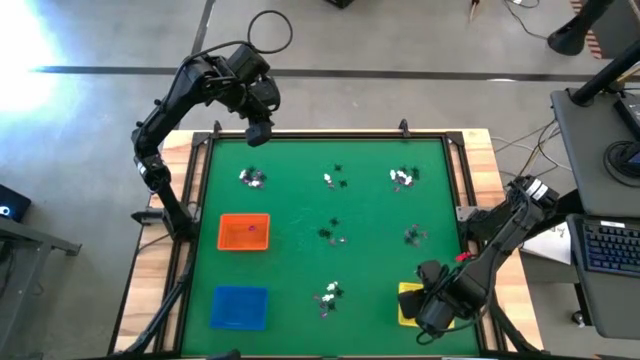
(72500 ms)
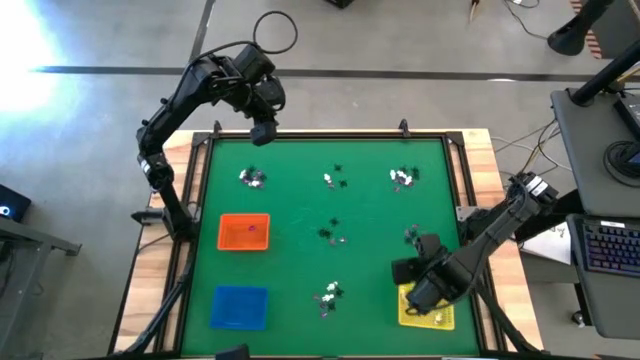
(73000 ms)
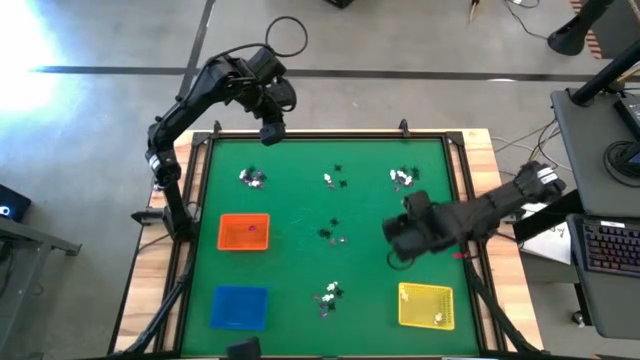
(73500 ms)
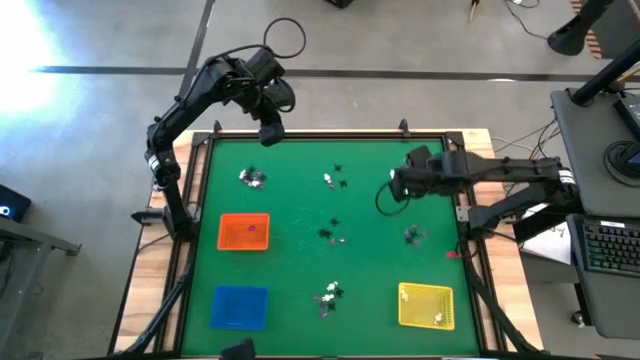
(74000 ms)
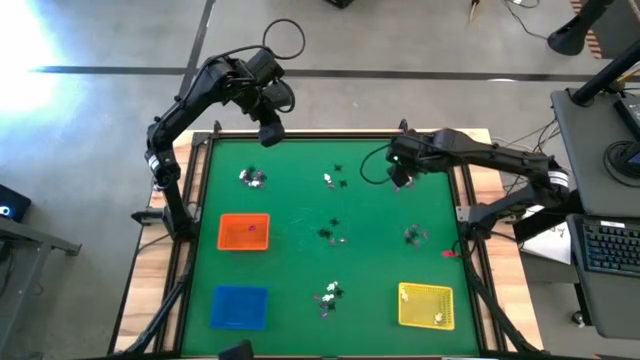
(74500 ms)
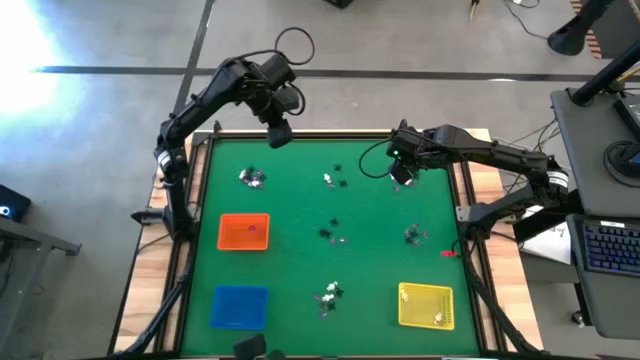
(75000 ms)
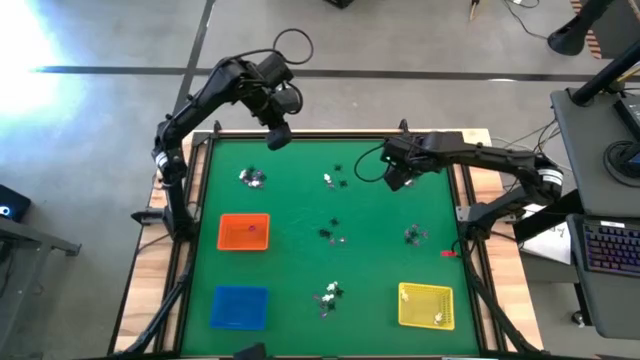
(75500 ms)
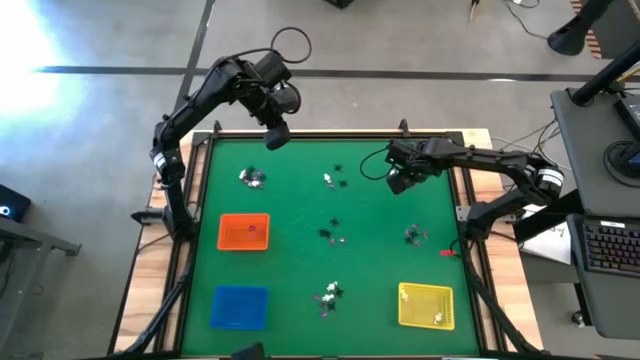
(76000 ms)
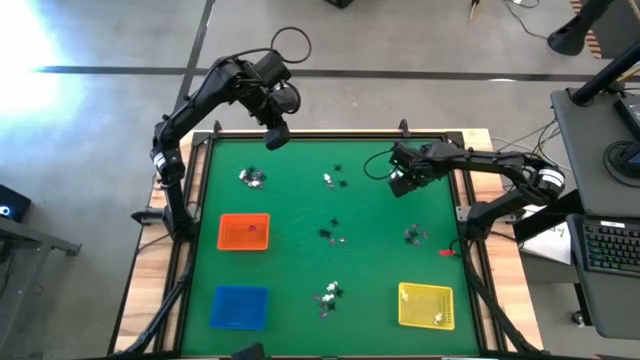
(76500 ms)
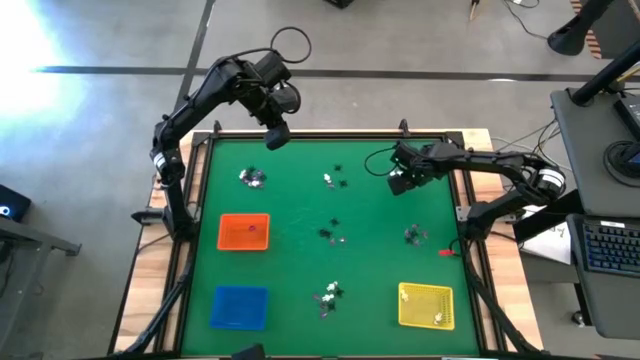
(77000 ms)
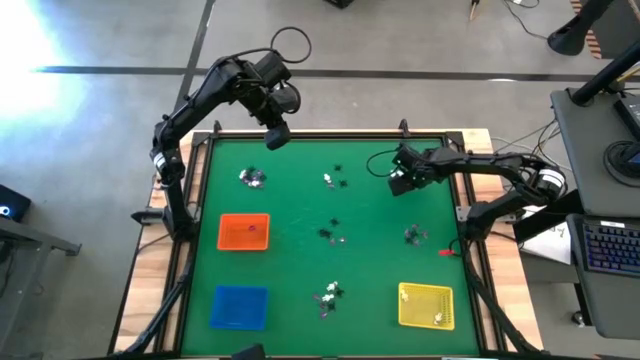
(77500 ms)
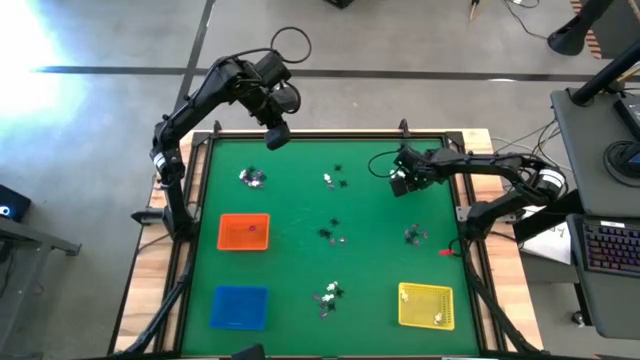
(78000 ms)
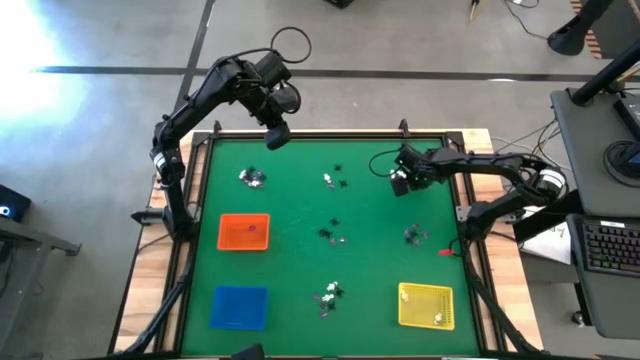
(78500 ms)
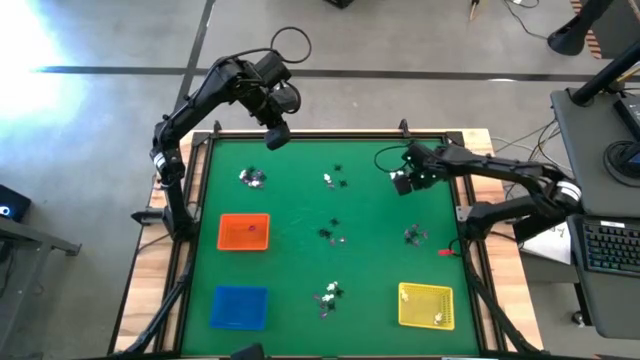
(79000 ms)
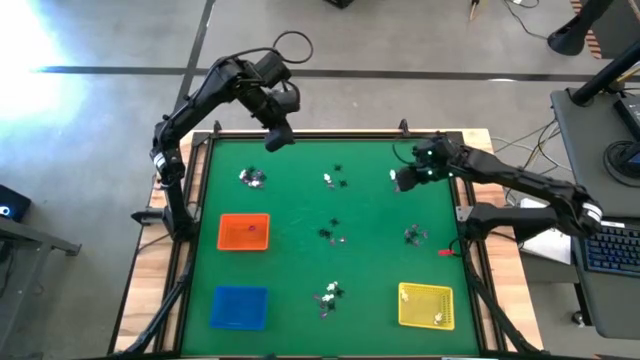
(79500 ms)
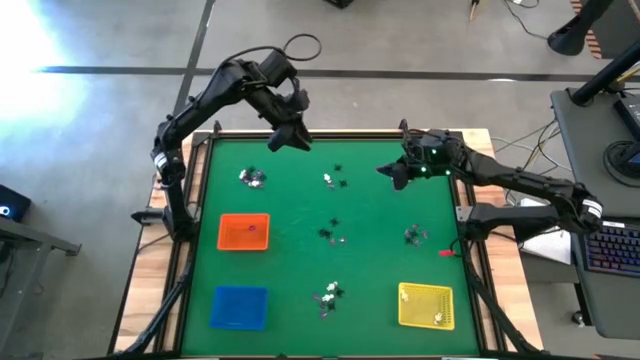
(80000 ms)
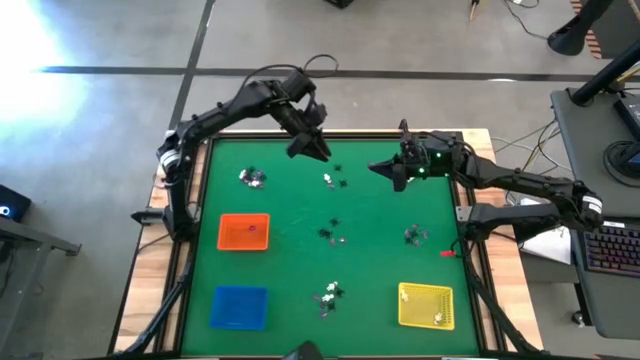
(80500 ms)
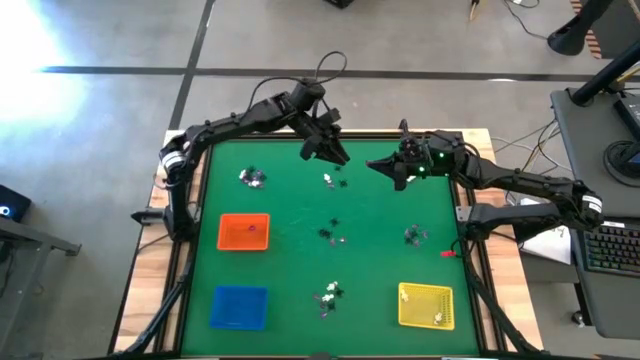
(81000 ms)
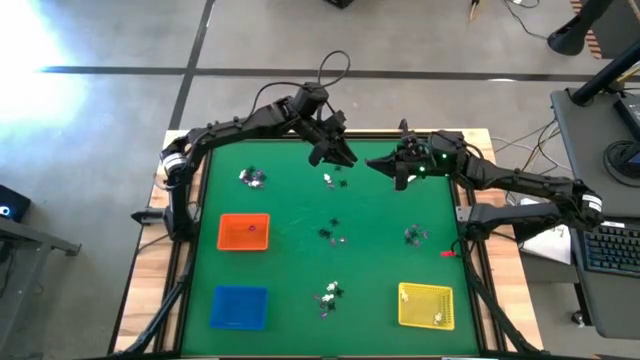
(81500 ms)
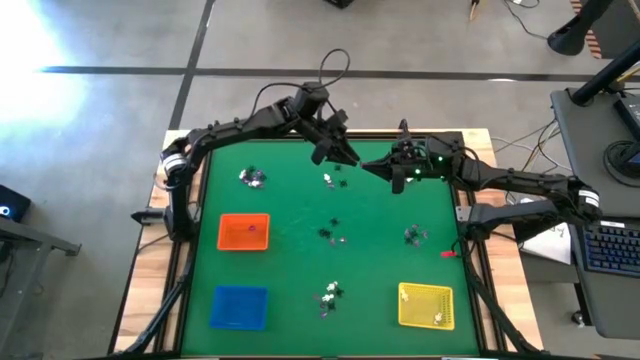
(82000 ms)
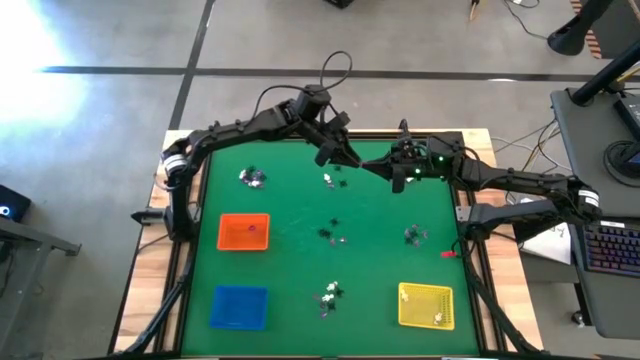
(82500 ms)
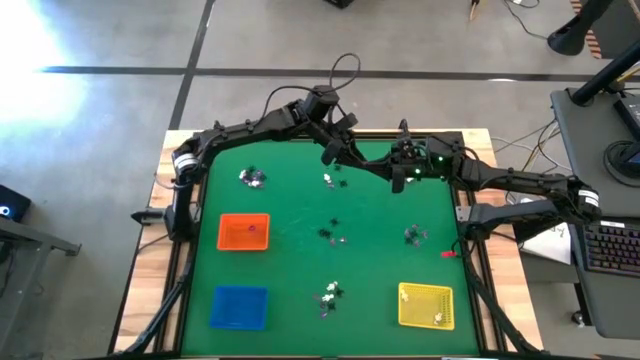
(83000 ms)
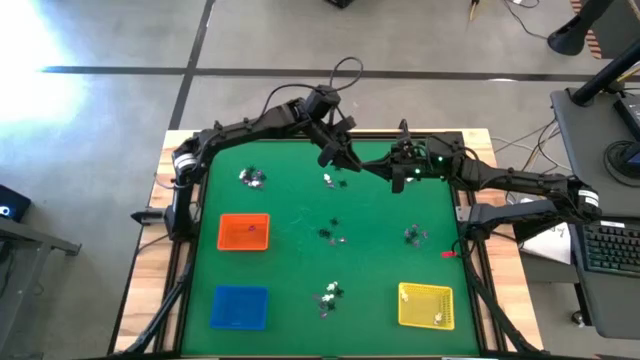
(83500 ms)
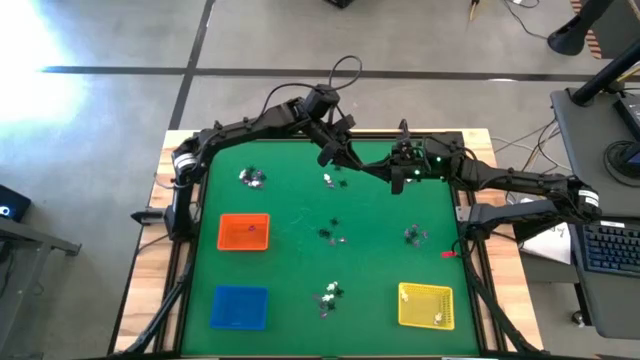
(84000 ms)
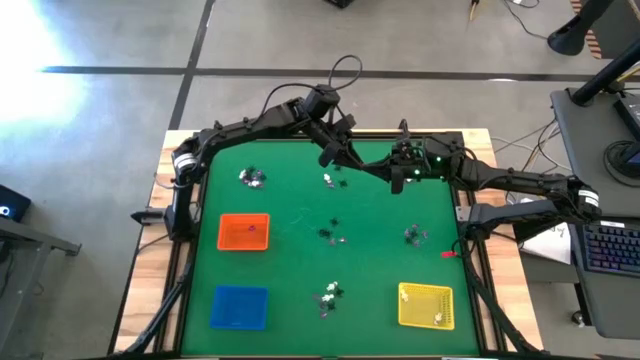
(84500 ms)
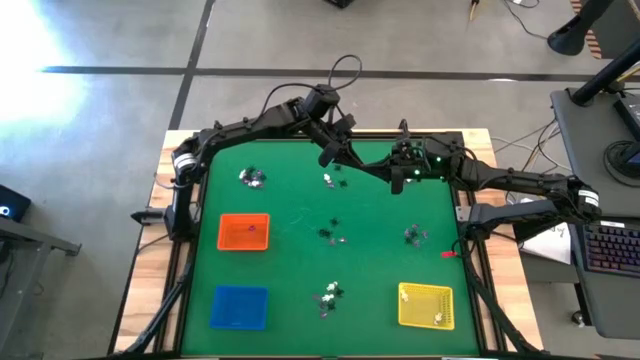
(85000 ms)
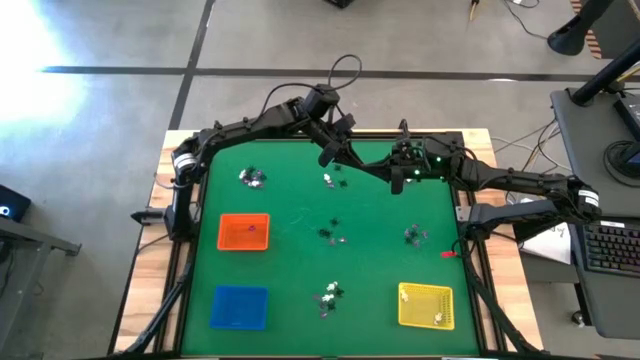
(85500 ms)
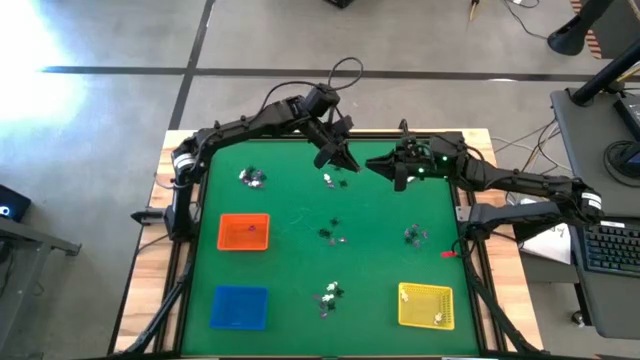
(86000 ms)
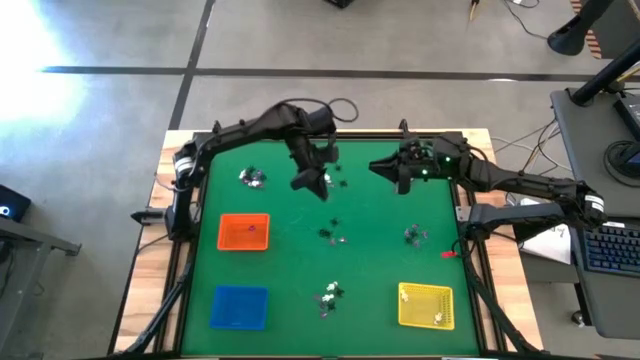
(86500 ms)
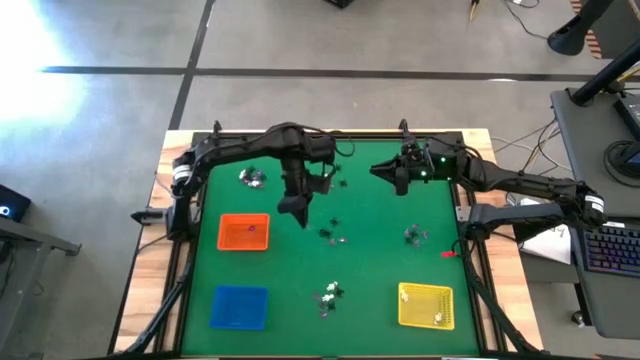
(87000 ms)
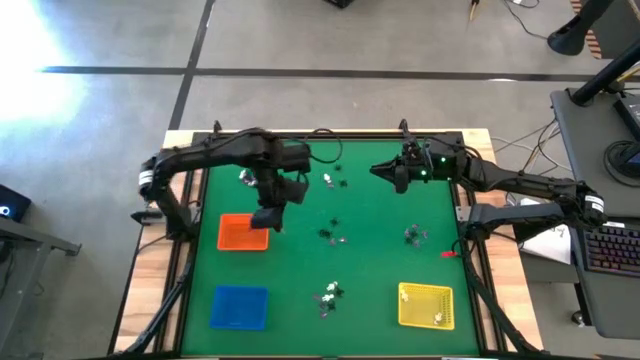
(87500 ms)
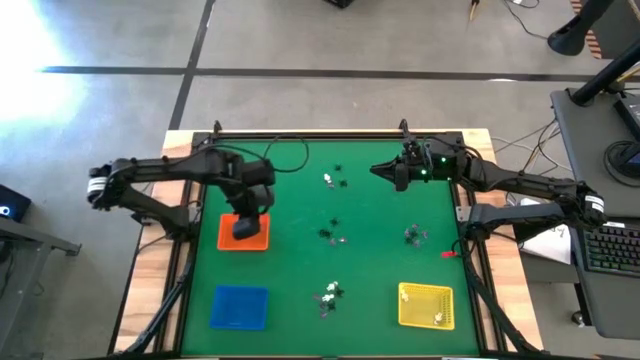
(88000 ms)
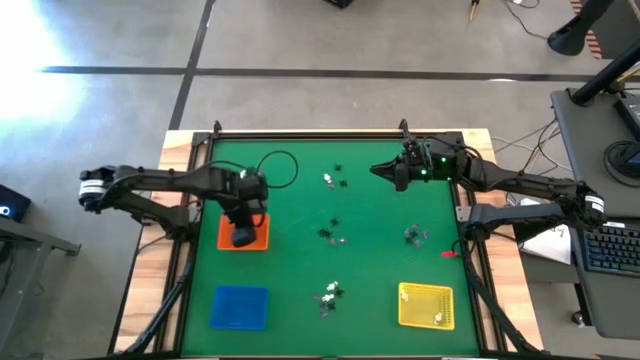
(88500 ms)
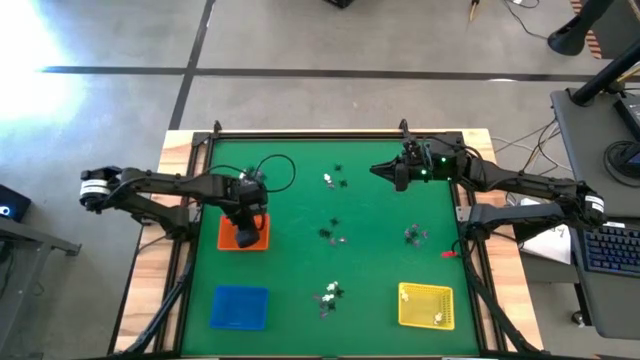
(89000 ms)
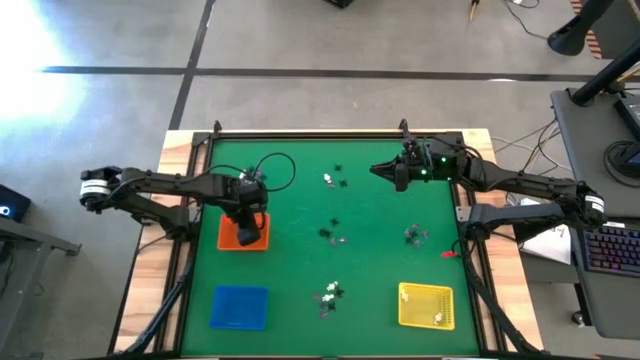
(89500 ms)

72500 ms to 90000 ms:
Task: Sort Halloween decoration
Put the violet witch hat toy into the orange bin

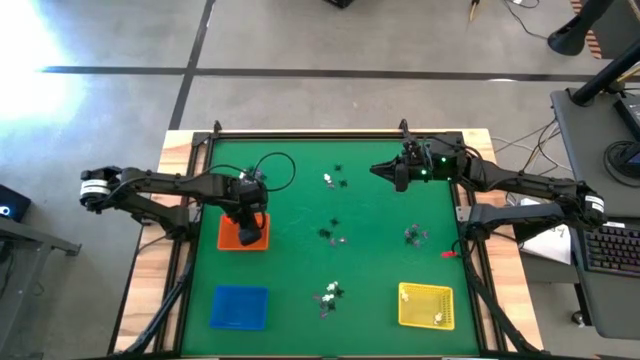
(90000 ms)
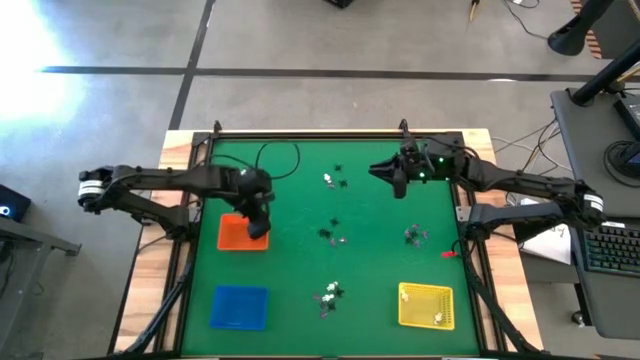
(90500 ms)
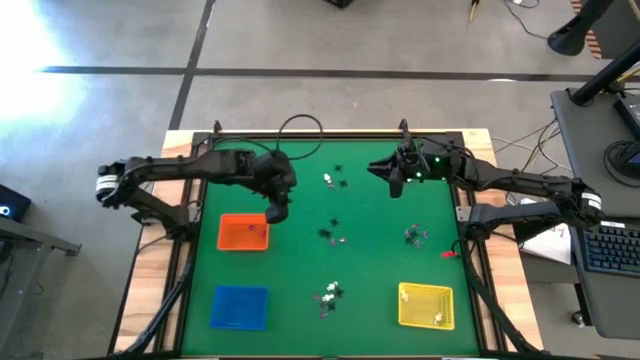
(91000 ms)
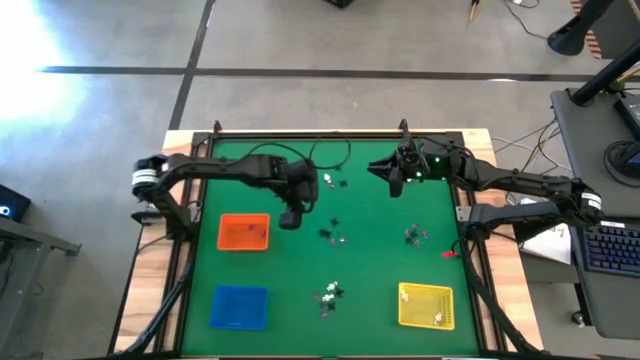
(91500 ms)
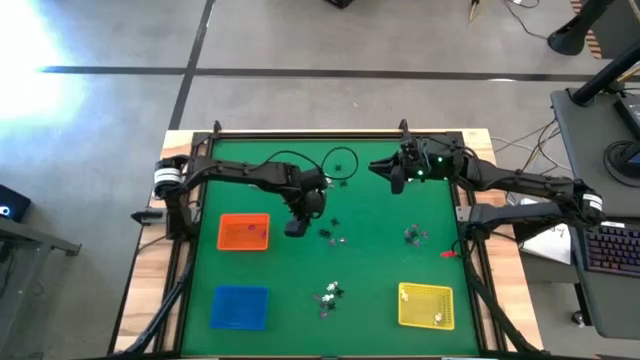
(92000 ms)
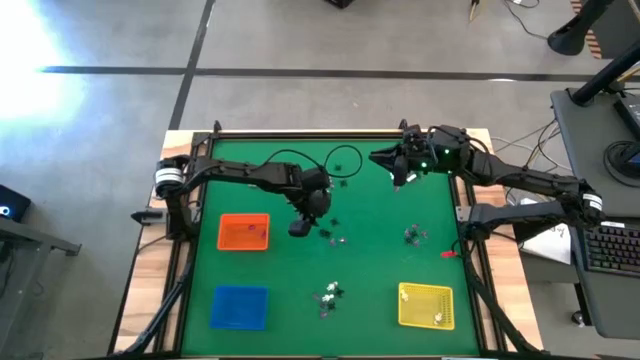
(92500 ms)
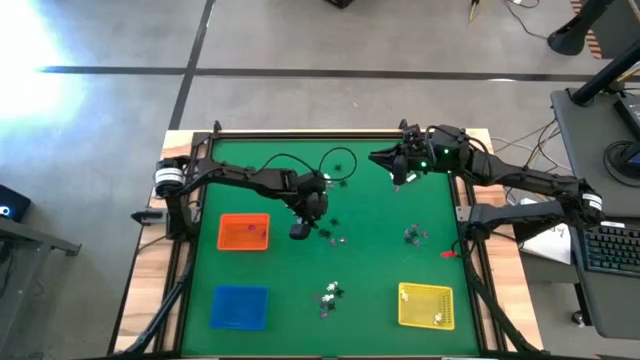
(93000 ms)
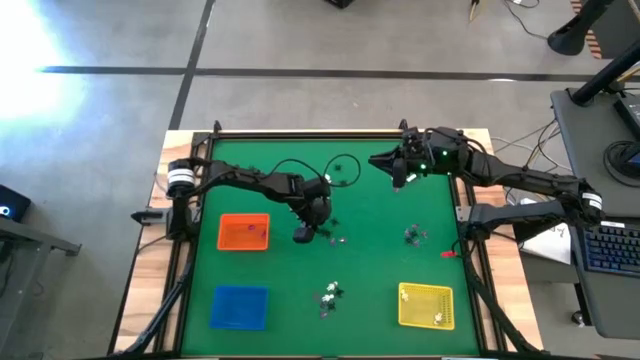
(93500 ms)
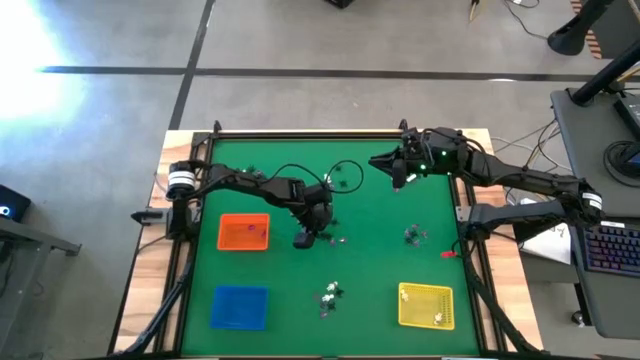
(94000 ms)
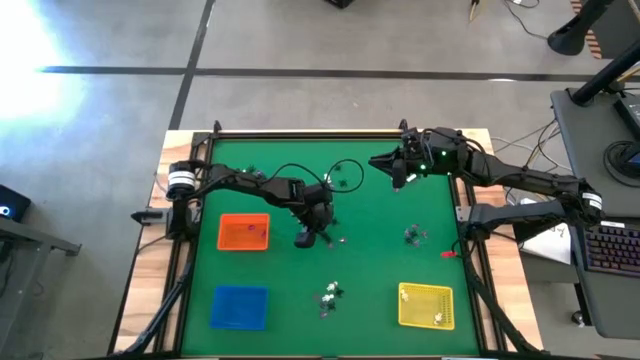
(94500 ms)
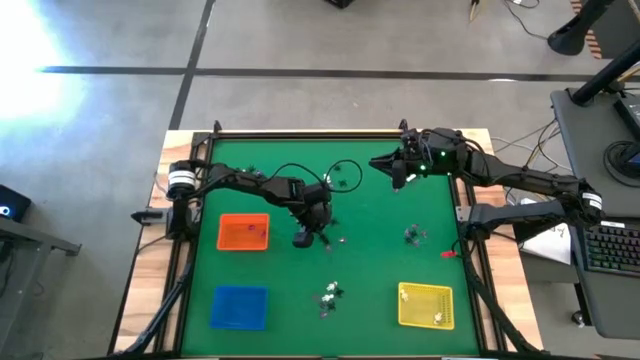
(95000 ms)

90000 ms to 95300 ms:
Put the black spider toy into the blue bin
